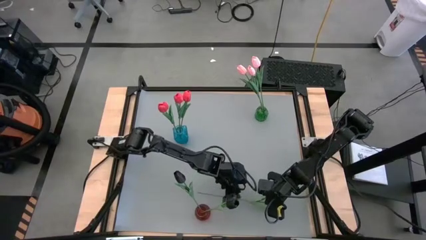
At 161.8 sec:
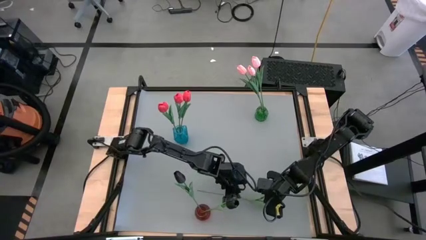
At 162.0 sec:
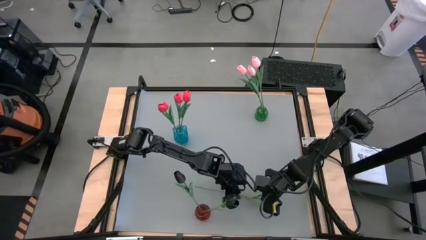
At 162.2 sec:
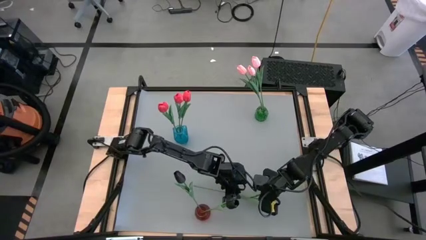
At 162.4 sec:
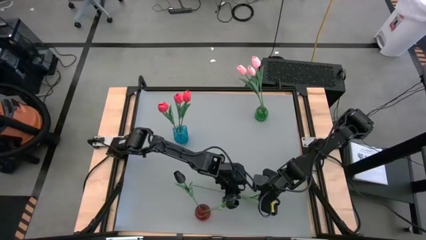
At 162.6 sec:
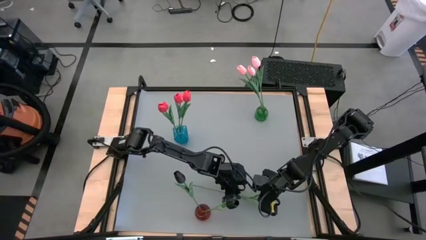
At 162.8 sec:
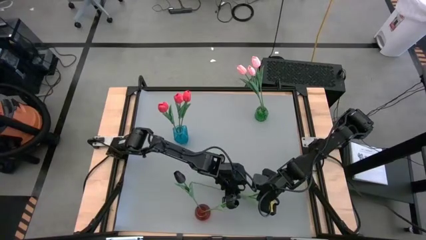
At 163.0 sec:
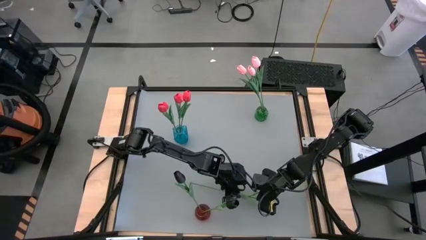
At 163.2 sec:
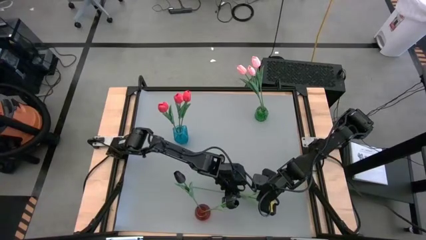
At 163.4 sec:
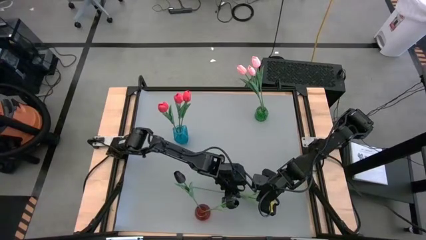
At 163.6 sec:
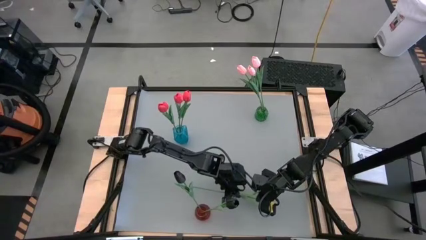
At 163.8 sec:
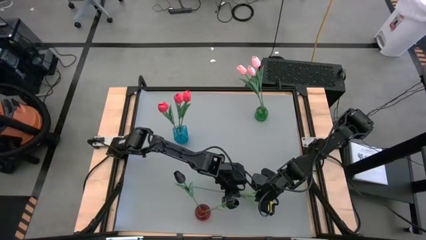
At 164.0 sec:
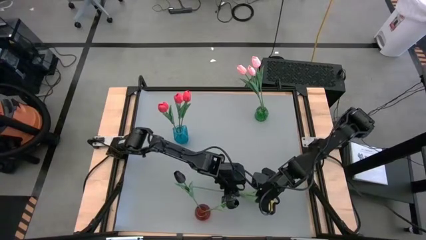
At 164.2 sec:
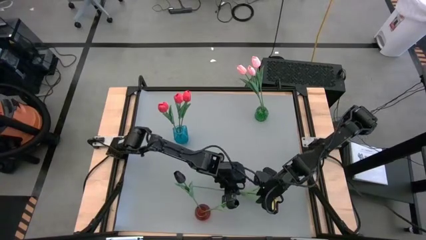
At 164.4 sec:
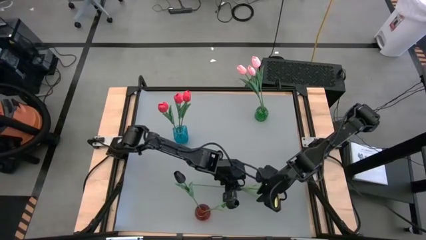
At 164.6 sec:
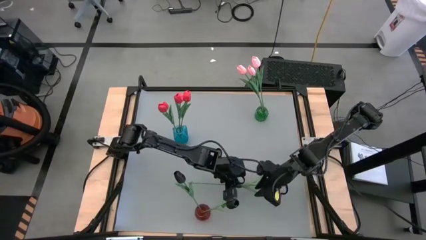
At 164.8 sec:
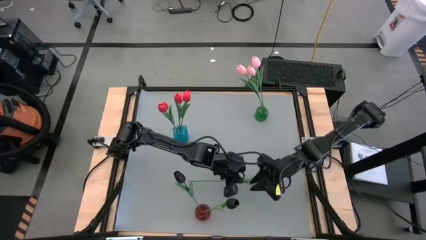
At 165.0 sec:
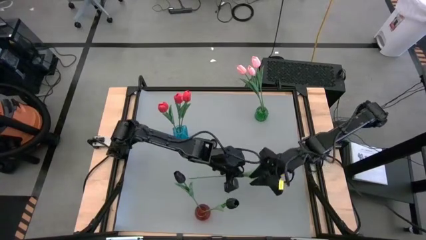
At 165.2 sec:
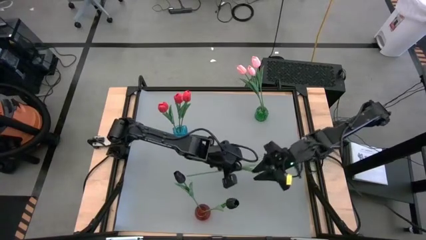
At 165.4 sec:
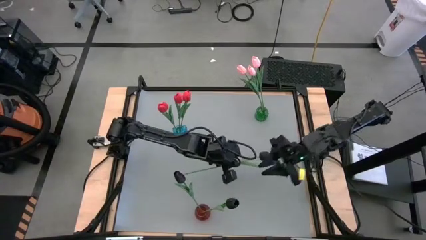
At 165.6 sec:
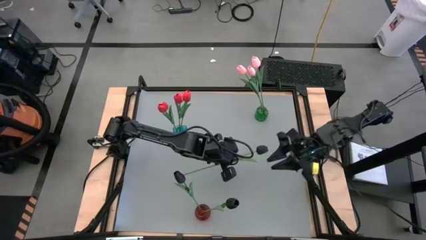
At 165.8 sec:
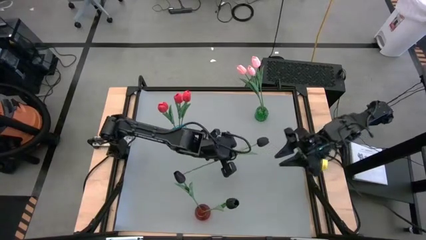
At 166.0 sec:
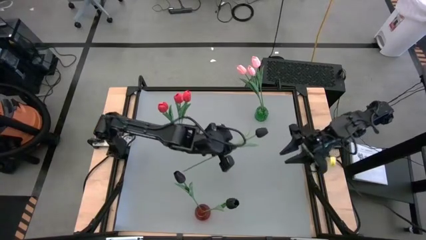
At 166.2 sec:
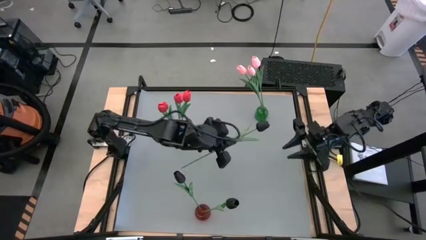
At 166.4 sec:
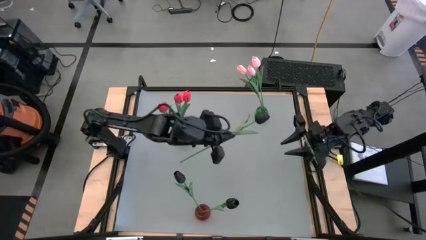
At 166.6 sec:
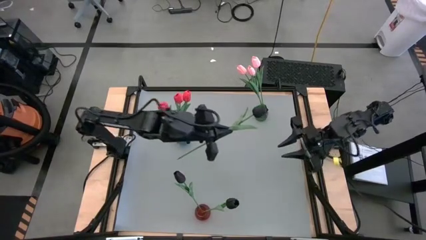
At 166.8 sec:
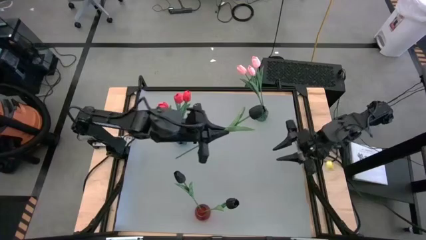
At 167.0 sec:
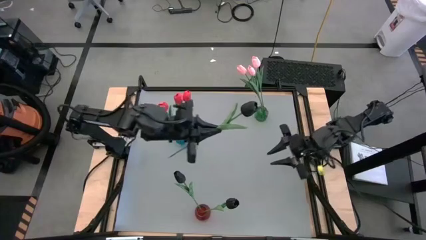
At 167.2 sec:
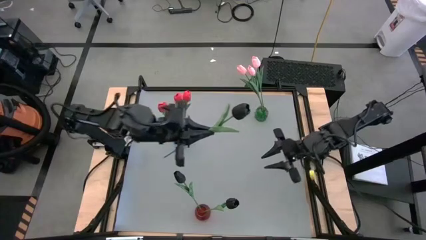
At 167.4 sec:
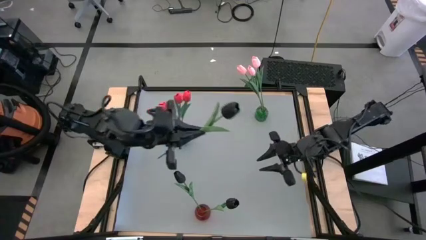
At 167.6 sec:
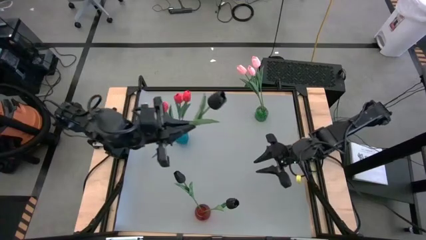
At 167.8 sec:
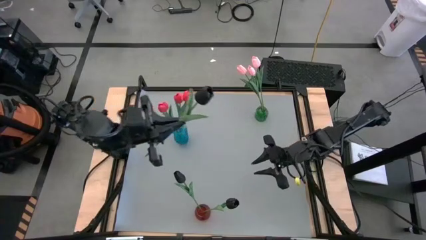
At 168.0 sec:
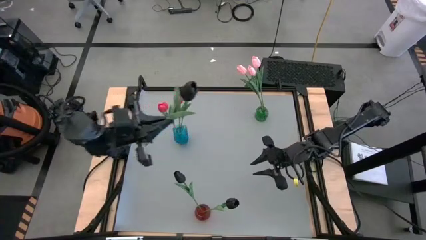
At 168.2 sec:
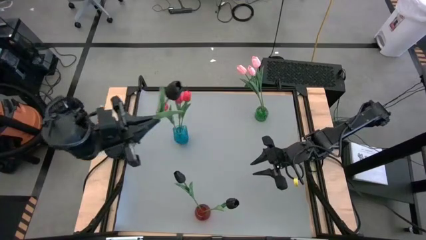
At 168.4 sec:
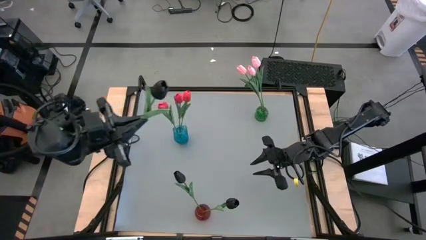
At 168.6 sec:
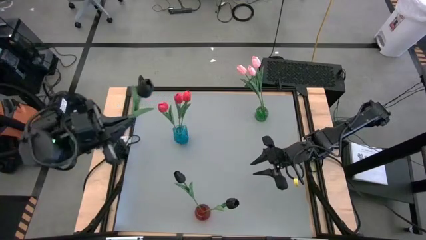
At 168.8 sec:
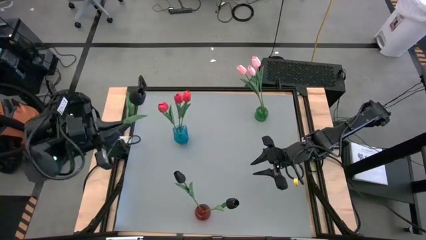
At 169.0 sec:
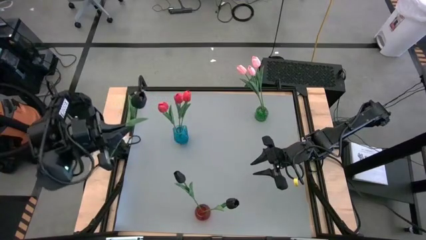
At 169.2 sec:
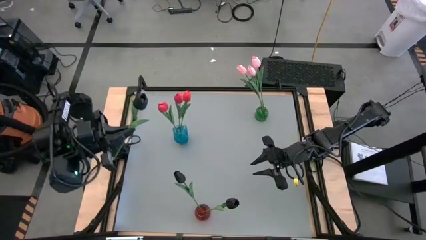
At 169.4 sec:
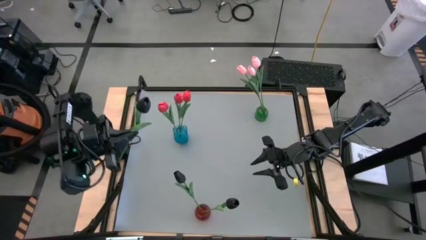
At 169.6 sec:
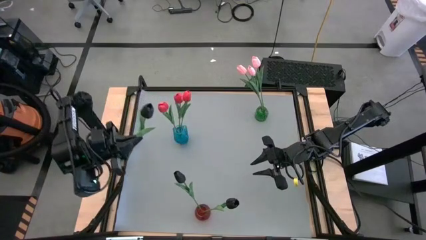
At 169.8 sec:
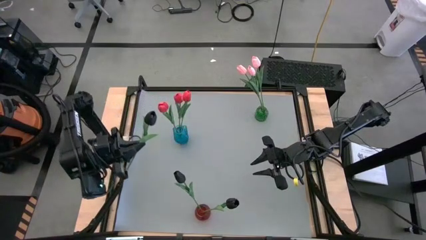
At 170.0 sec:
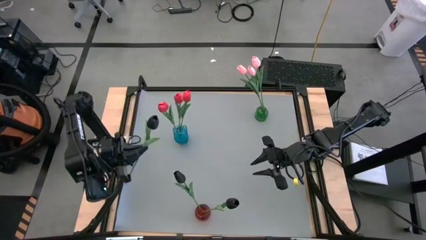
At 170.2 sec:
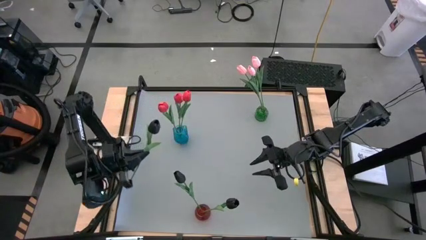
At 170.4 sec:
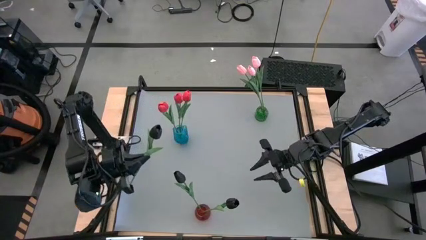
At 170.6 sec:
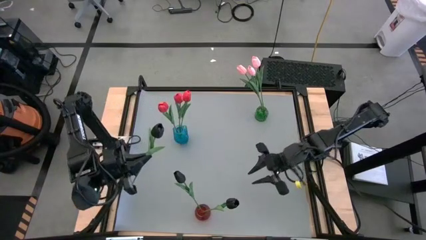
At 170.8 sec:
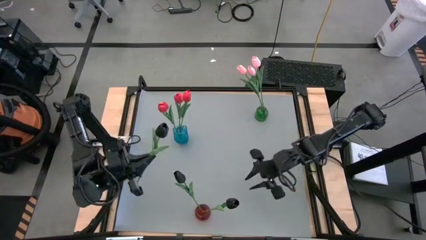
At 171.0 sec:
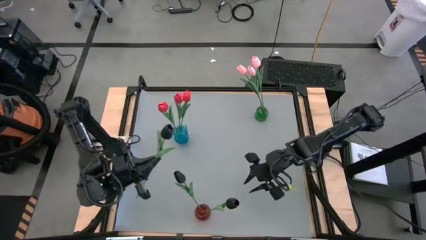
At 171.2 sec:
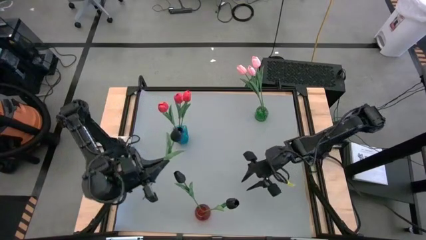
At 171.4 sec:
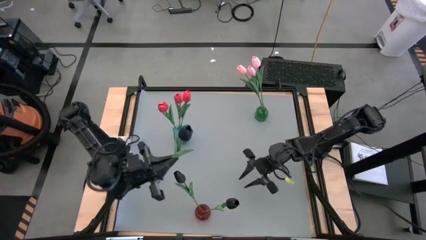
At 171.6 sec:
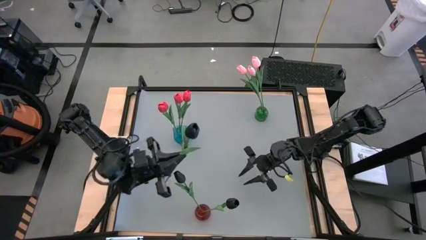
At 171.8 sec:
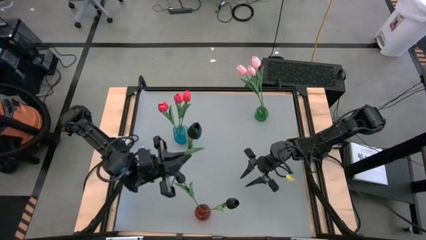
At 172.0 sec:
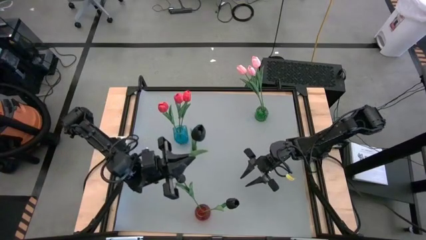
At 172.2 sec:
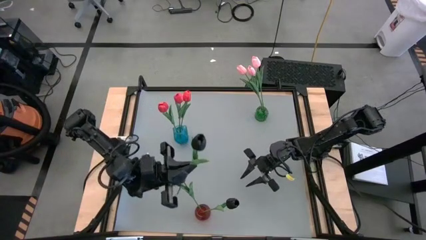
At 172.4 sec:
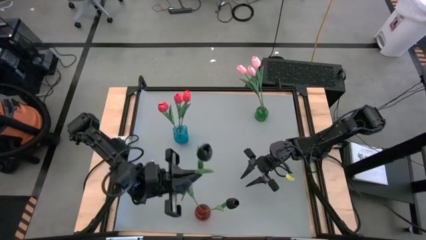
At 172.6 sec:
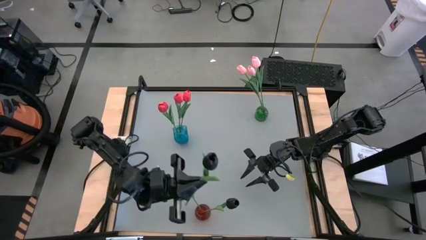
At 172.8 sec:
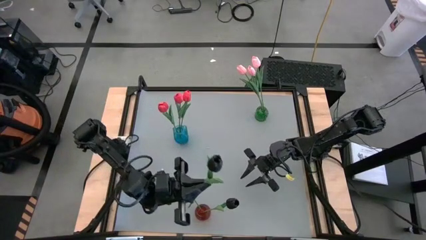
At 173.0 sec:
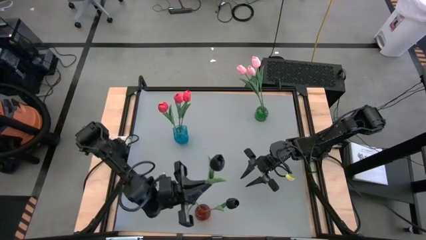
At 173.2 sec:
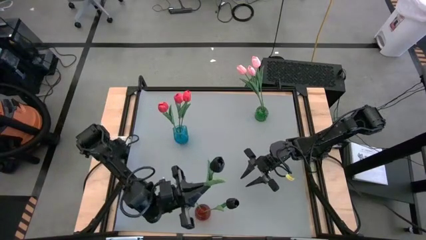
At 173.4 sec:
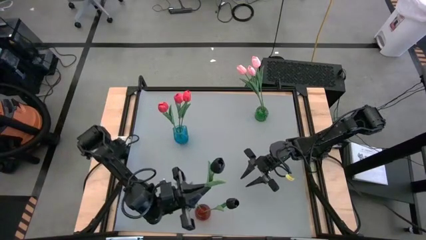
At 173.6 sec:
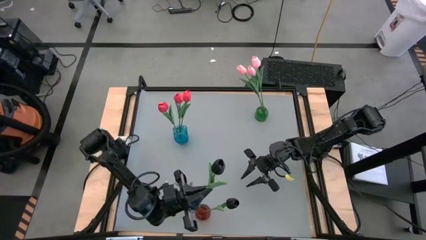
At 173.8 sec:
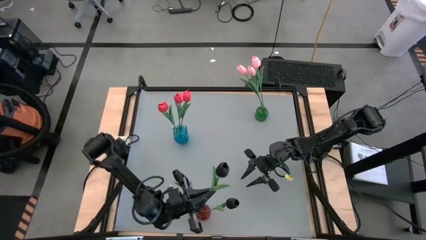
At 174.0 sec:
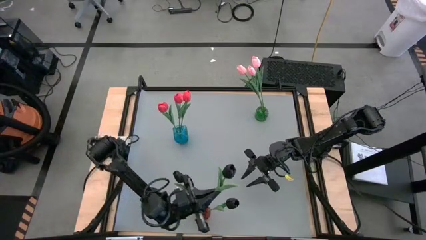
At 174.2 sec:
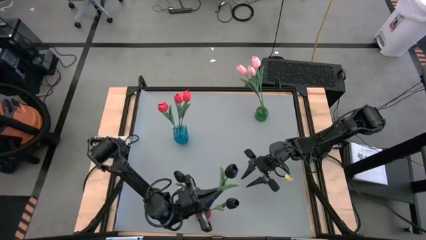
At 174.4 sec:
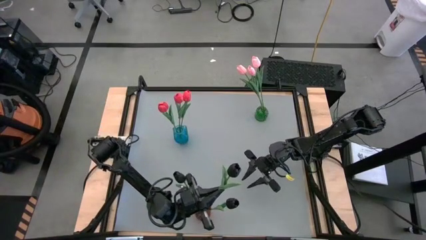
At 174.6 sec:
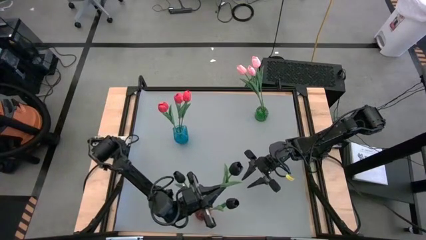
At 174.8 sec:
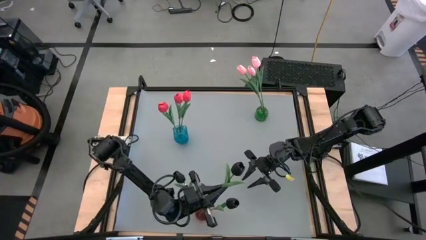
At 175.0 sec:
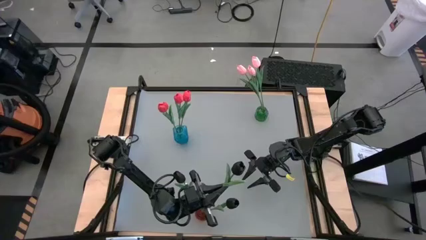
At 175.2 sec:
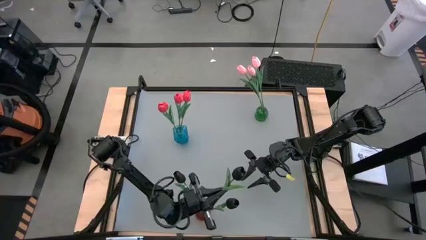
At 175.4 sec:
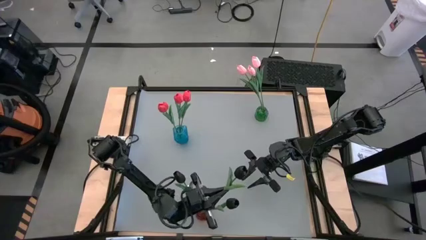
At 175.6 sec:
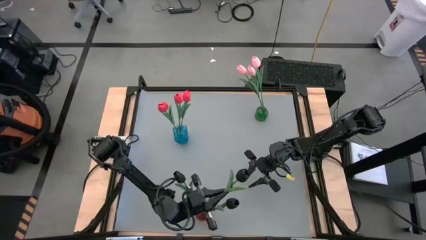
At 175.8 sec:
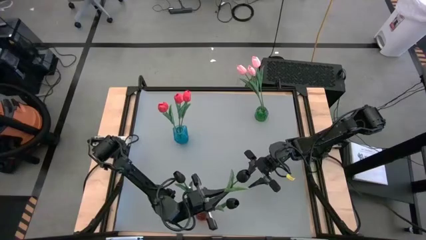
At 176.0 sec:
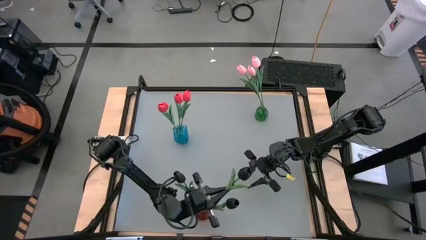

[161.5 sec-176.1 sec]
Task: Sort flowers into vase by color
Put the black flower into the red vase

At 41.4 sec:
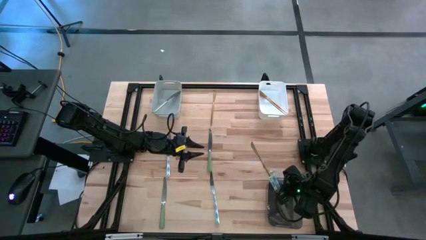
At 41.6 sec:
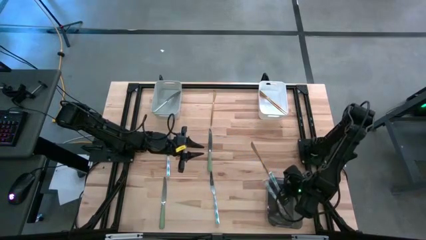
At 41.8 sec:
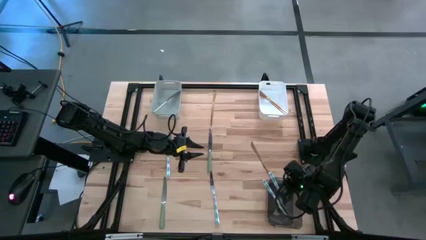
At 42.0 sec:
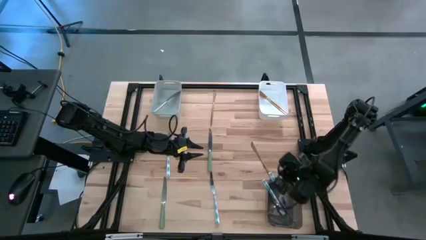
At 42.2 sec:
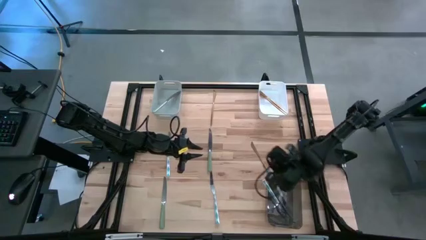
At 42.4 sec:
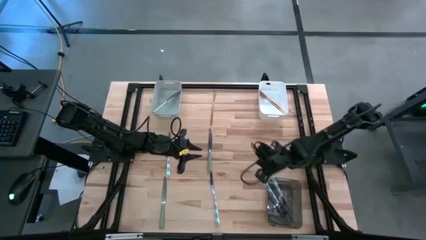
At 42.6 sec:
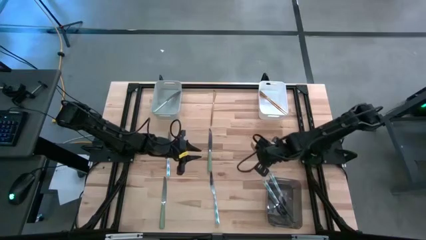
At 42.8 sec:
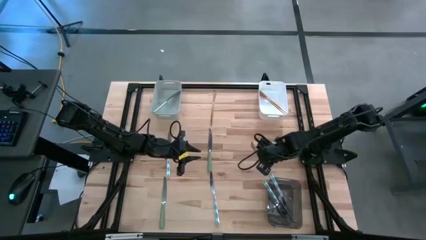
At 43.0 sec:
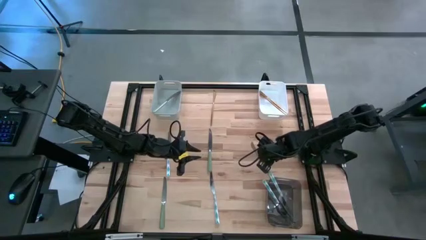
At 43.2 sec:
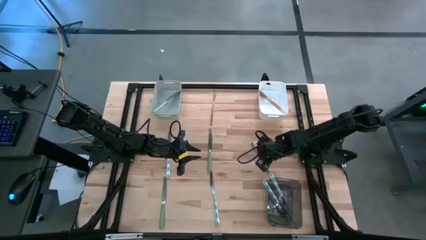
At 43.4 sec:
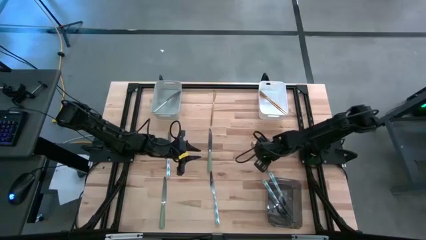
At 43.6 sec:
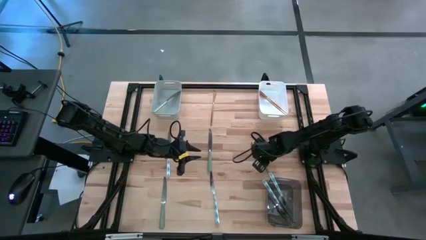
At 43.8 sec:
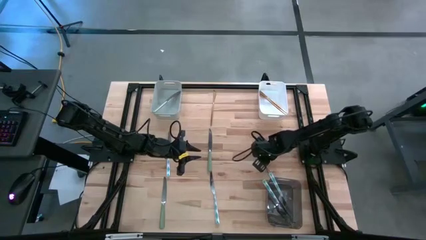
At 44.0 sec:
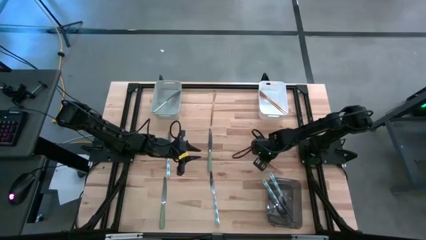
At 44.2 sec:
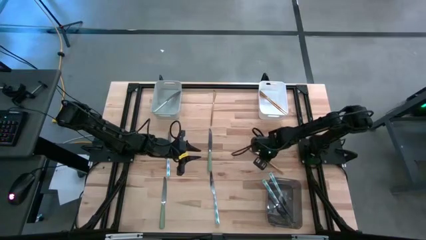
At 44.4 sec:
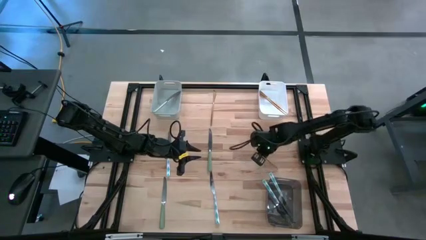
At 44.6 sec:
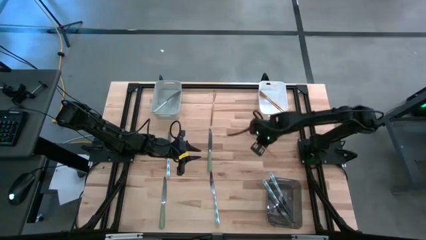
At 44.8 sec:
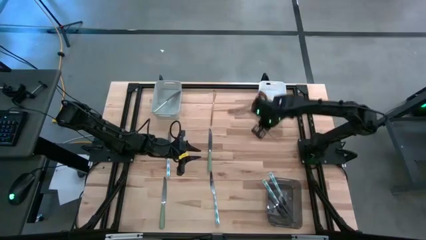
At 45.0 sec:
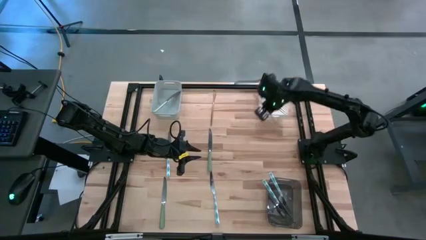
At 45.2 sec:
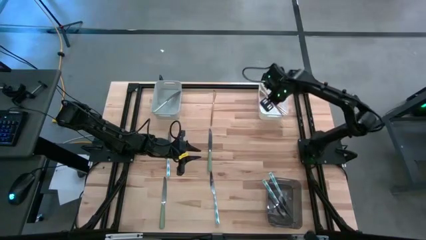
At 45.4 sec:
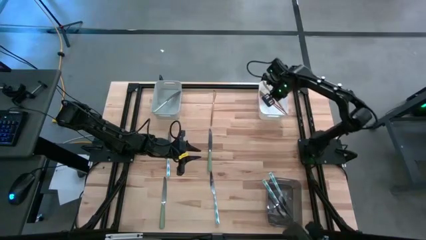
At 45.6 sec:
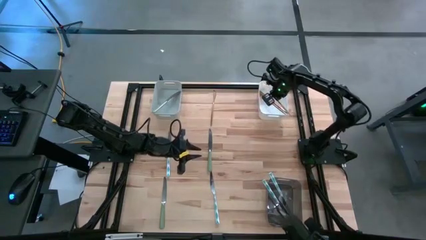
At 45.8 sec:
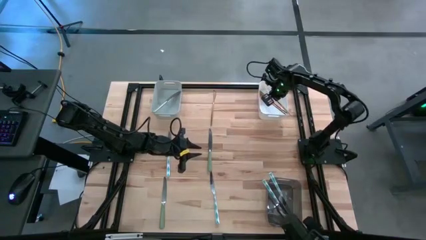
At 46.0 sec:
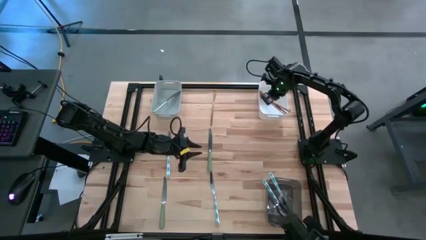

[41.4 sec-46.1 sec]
Task: Sort silverware by color (type)
Put the right golden knife into the white bin
